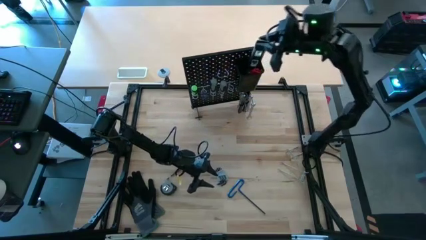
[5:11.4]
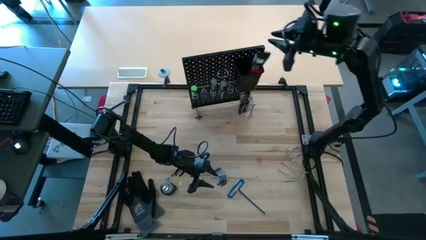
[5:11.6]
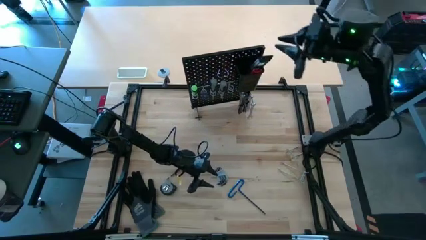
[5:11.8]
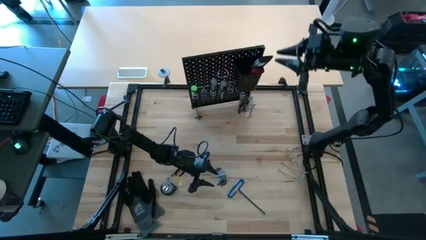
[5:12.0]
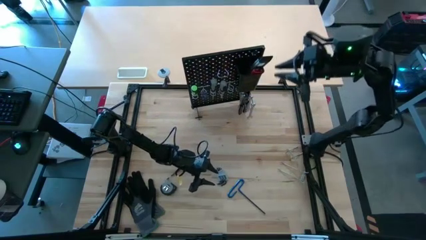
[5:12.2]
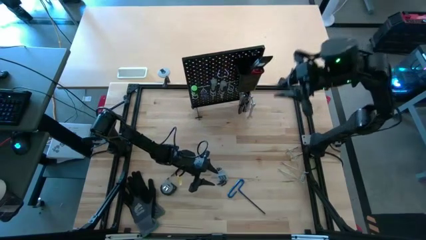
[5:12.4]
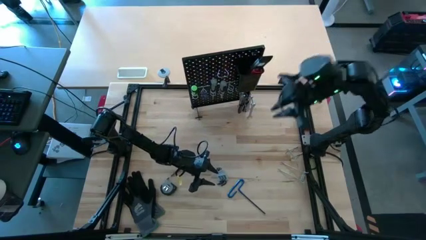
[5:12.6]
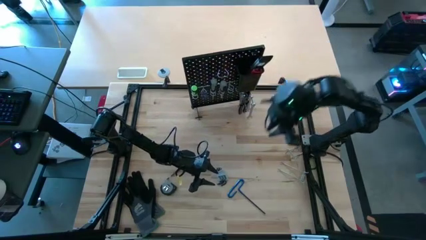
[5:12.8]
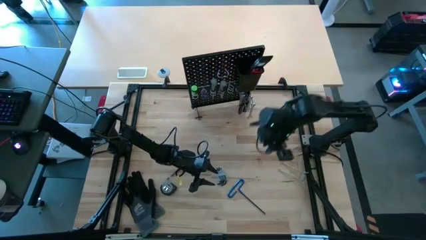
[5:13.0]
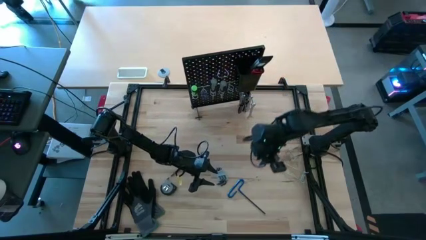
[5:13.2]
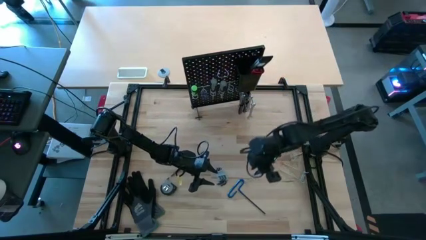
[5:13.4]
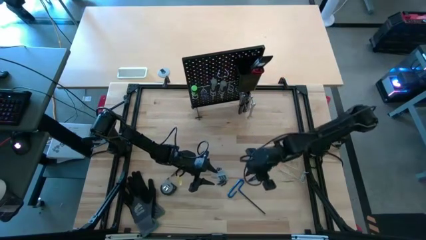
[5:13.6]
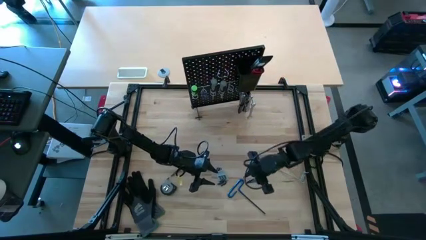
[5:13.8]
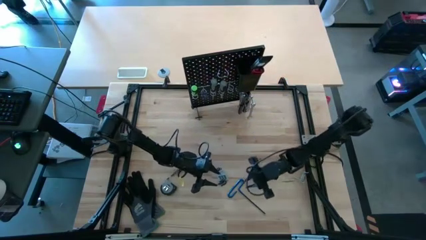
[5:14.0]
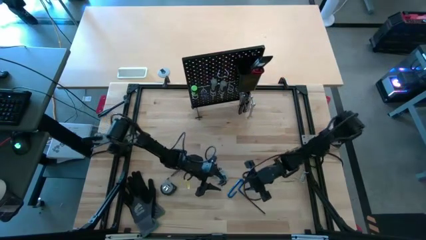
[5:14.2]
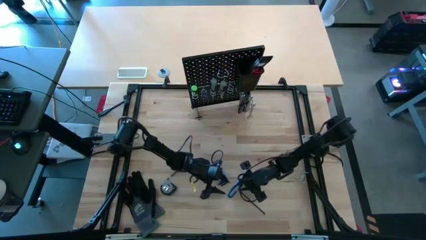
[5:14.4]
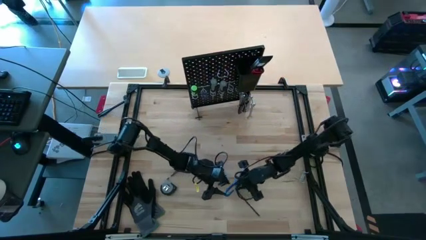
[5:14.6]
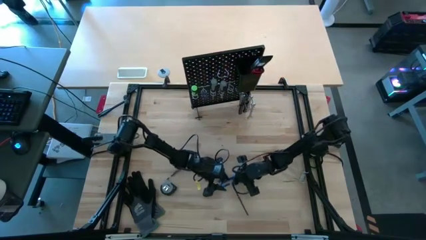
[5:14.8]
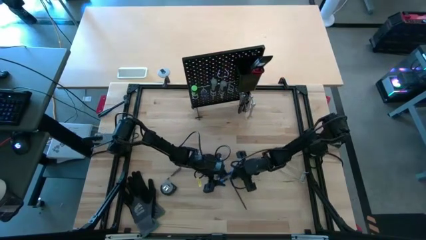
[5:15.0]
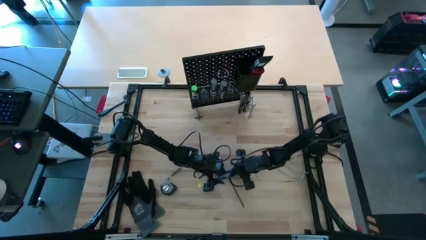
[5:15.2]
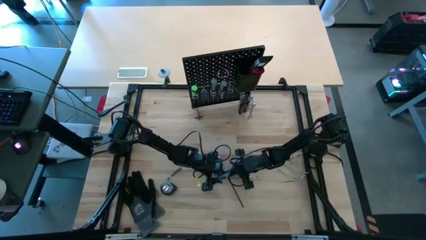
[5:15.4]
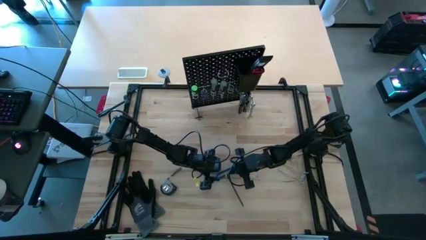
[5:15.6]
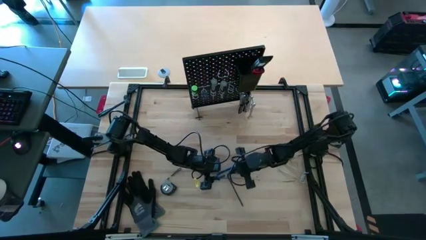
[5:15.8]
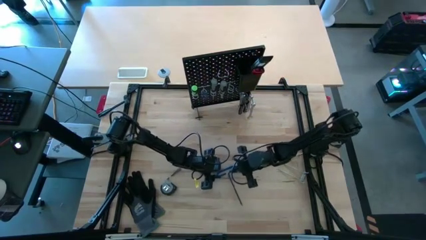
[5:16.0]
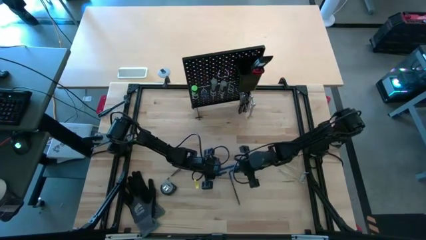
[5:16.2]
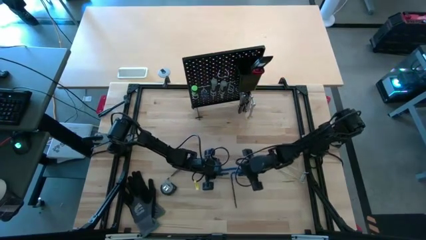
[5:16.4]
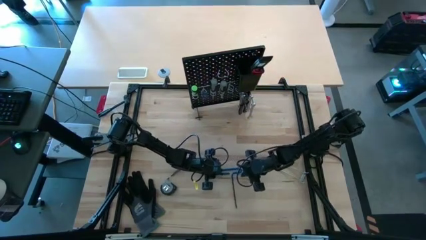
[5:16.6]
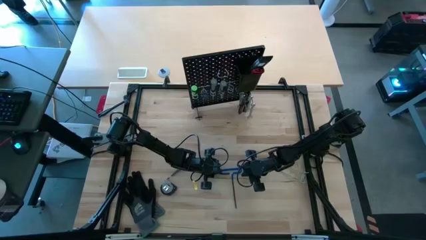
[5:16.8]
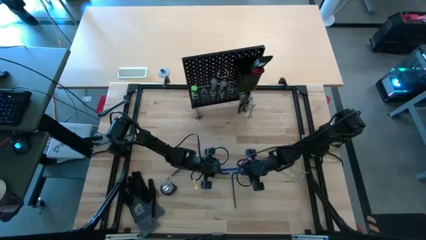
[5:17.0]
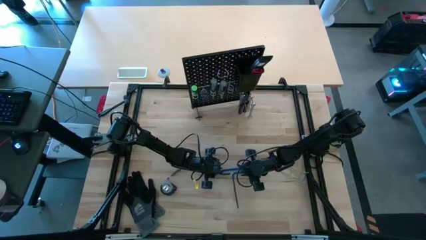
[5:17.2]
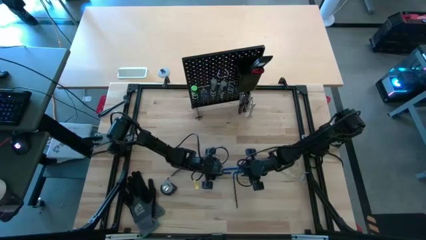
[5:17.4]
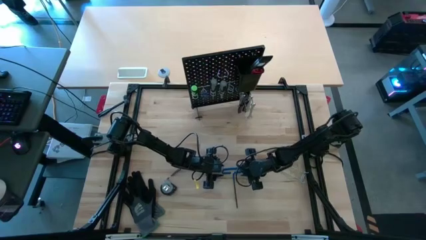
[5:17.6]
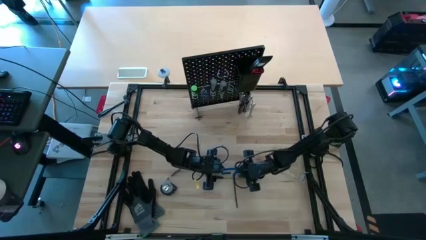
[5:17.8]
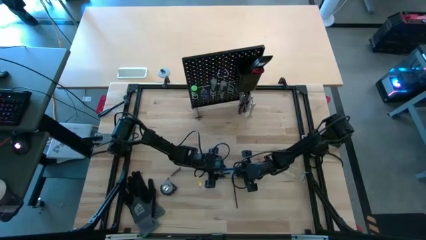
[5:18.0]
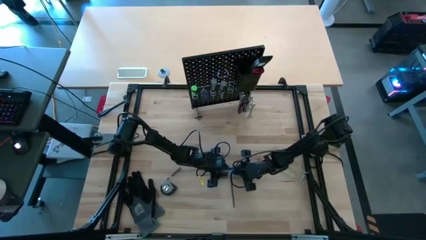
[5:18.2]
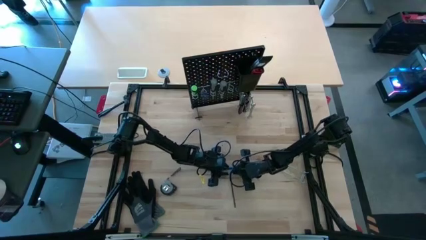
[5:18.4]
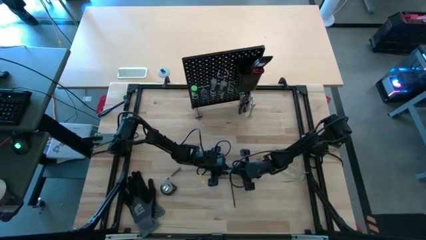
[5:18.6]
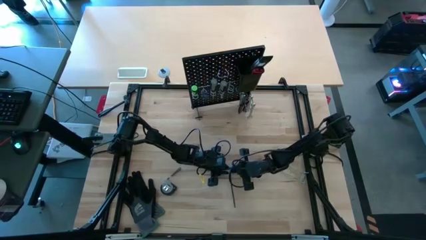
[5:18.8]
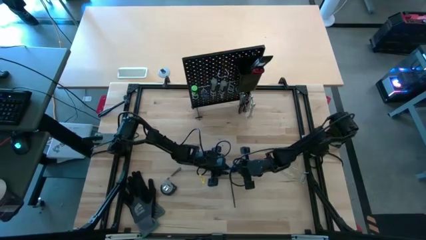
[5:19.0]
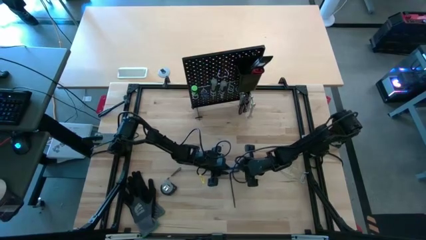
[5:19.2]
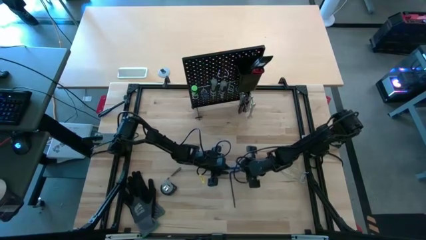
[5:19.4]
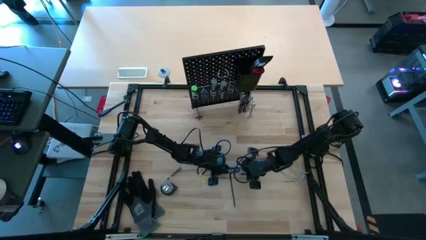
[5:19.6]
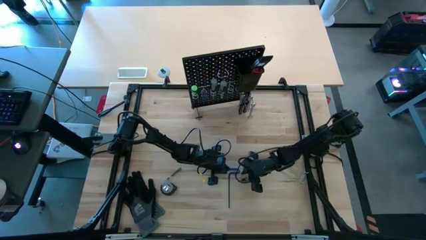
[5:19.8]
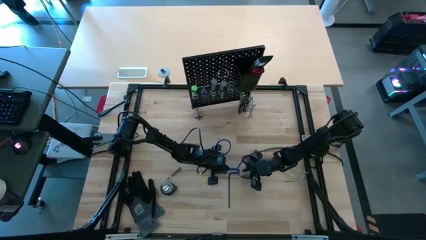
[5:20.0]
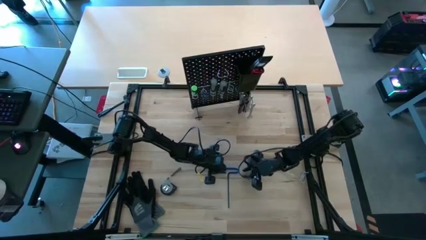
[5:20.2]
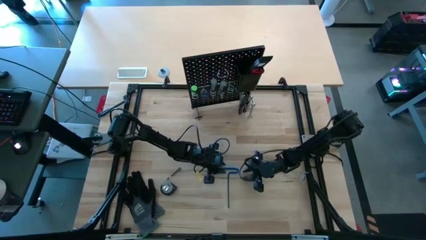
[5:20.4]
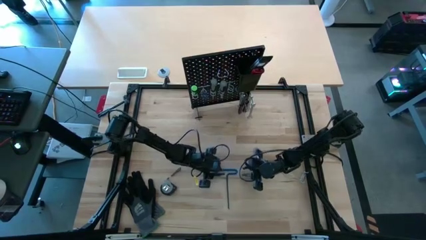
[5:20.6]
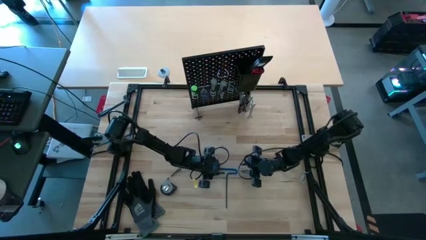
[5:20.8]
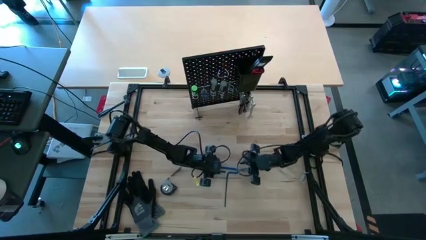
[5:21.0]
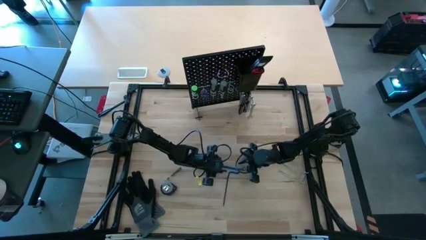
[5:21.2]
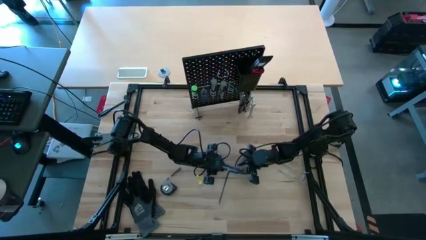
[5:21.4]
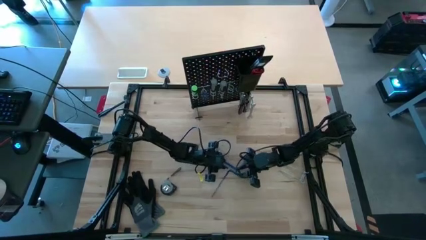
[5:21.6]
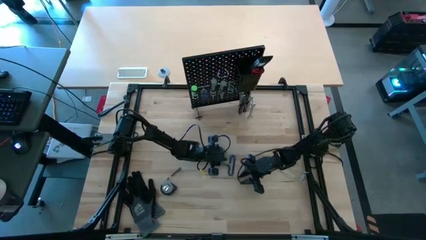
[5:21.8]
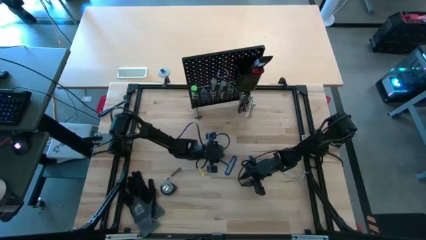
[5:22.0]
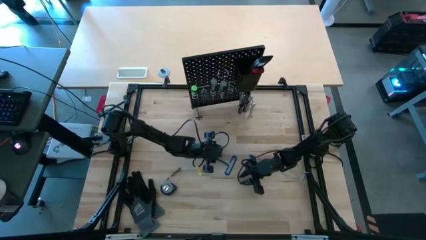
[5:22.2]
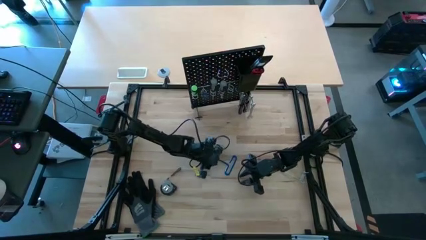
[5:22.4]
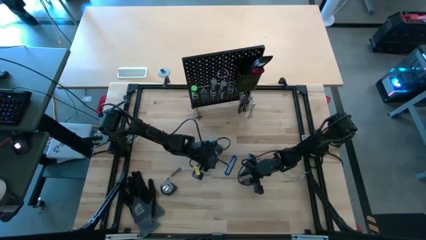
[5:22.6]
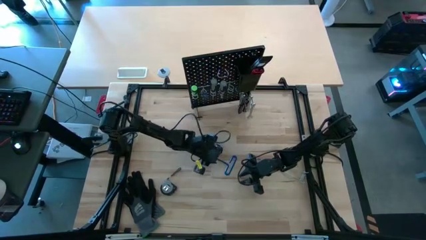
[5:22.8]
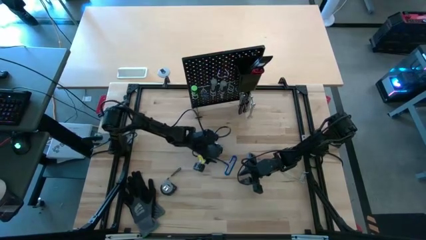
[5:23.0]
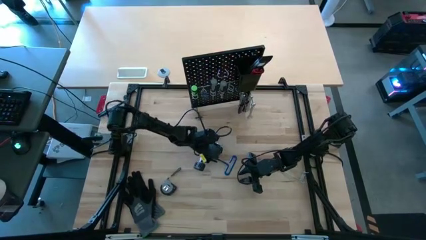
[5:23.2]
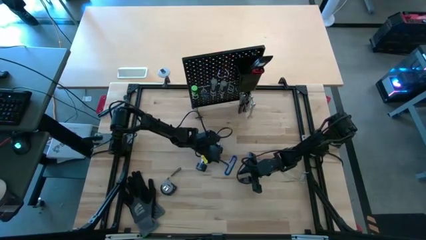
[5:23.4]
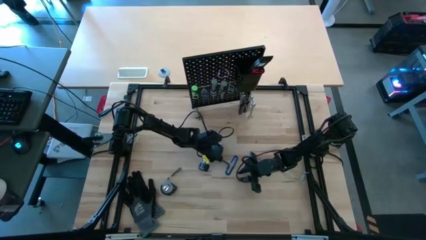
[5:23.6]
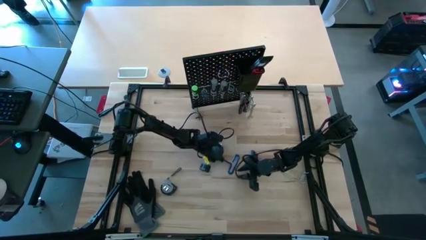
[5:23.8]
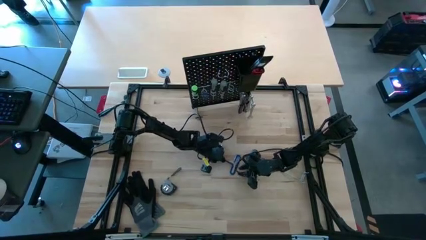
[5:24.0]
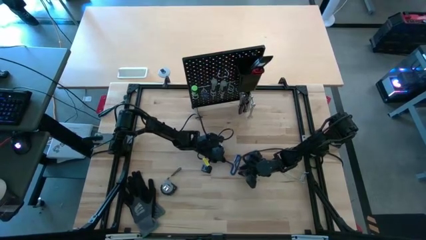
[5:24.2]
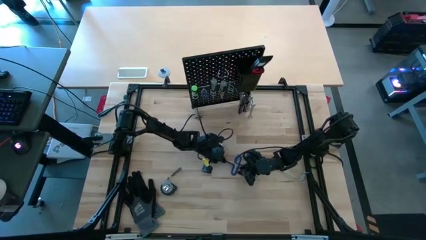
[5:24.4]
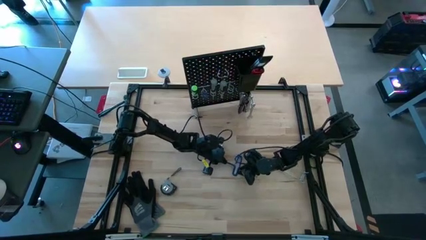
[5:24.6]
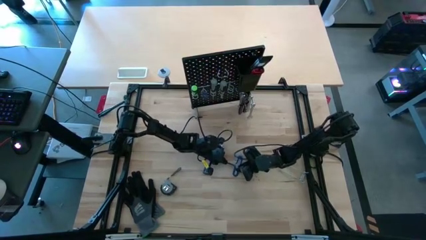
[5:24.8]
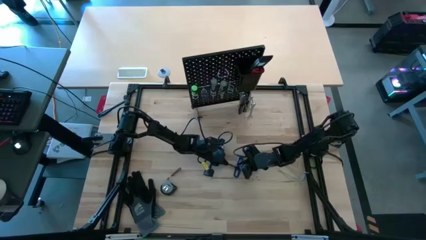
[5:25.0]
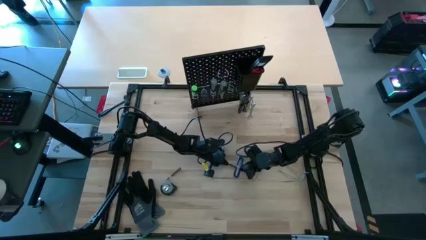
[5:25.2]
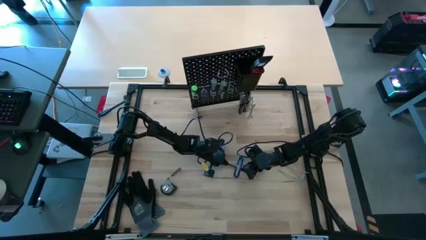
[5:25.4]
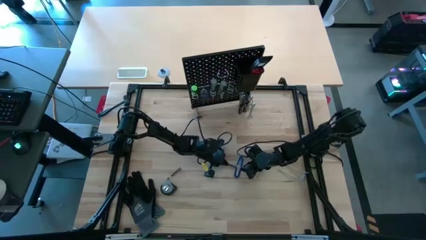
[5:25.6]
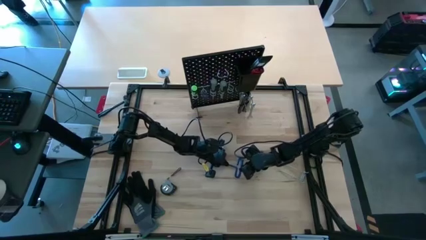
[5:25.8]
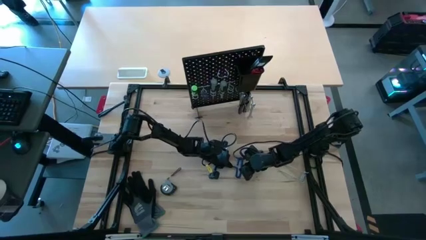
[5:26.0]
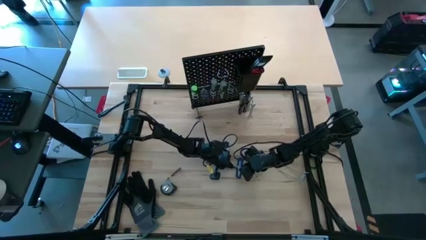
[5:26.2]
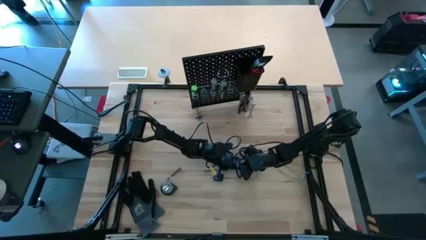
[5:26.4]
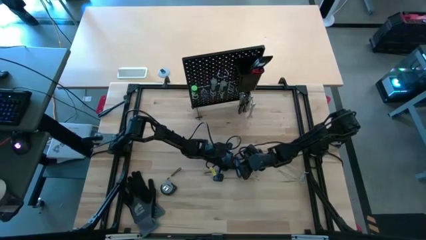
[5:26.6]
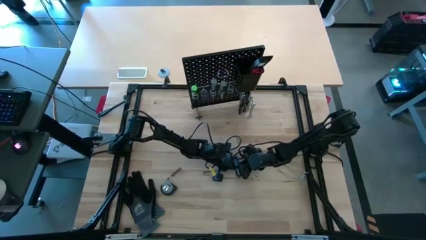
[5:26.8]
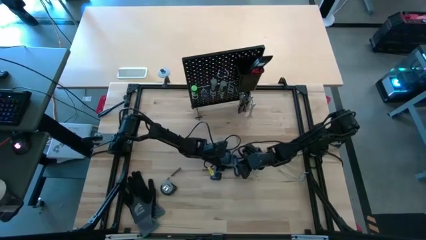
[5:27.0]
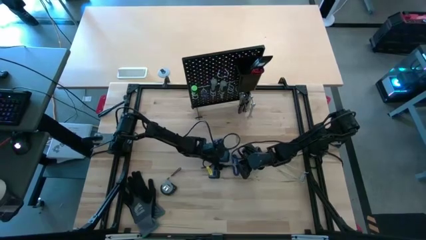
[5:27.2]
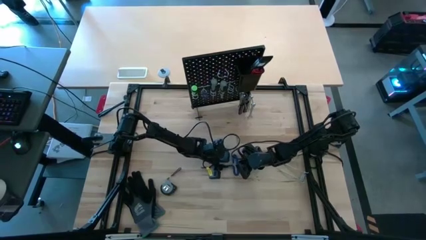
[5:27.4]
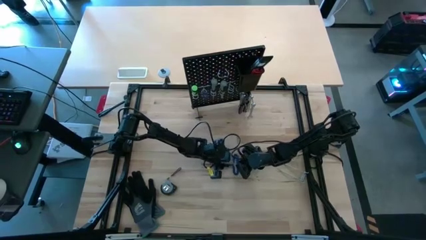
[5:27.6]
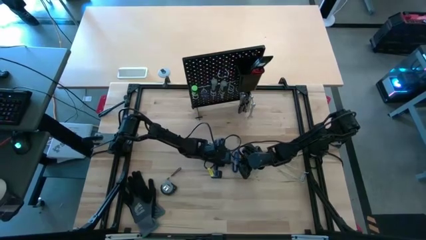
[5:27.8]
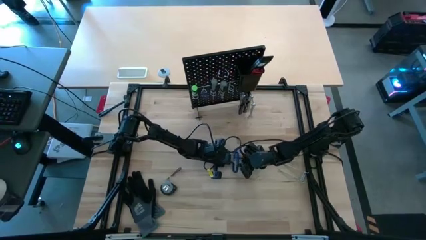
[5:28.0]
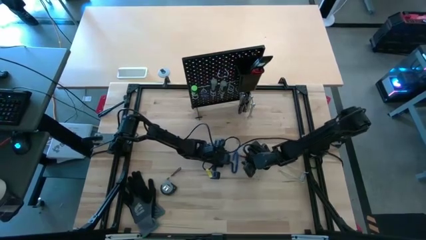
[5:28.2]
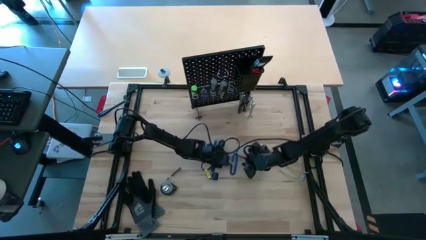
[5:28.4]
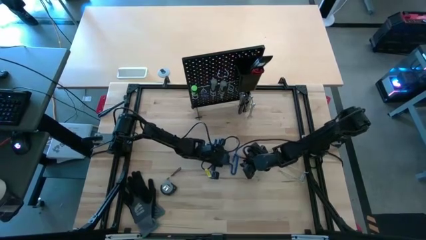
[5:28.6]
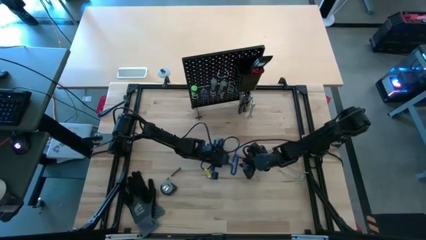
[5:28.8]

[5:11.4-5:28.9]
Task: Hang tools onto peg board
Put the pick tool into the pegboard bin
